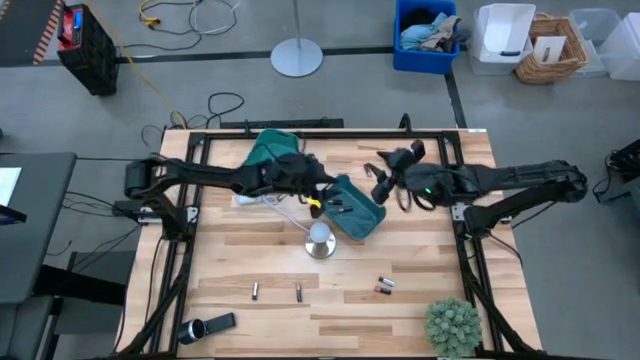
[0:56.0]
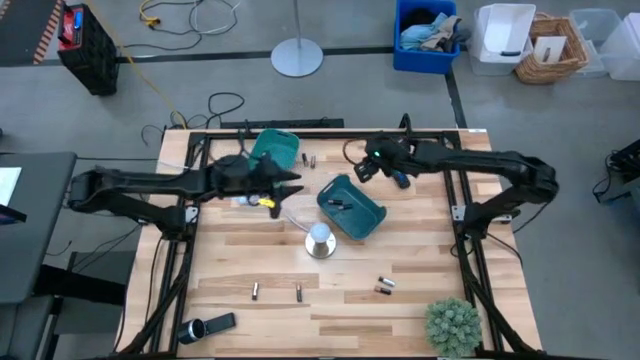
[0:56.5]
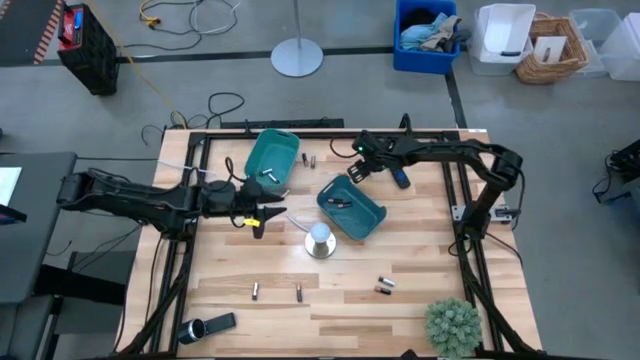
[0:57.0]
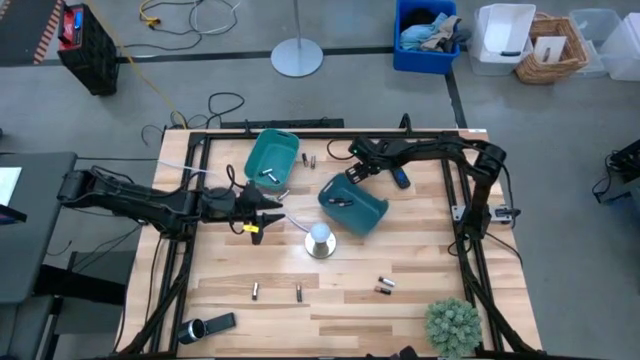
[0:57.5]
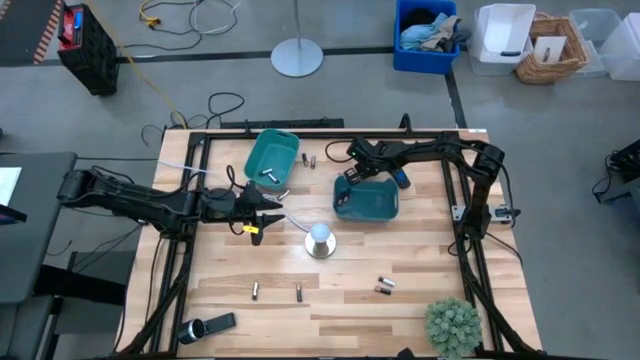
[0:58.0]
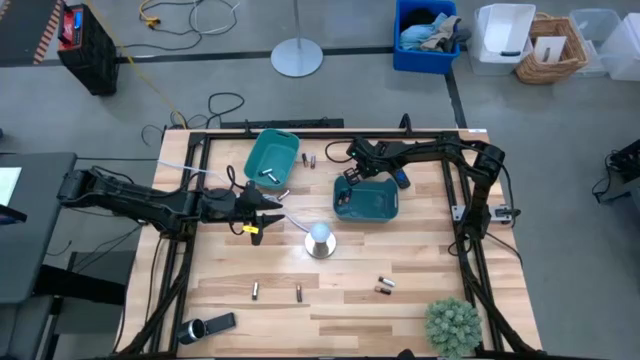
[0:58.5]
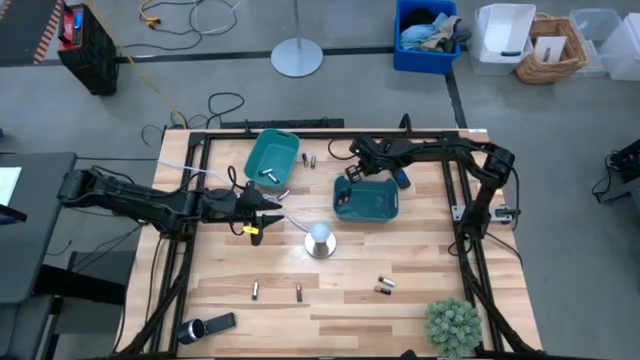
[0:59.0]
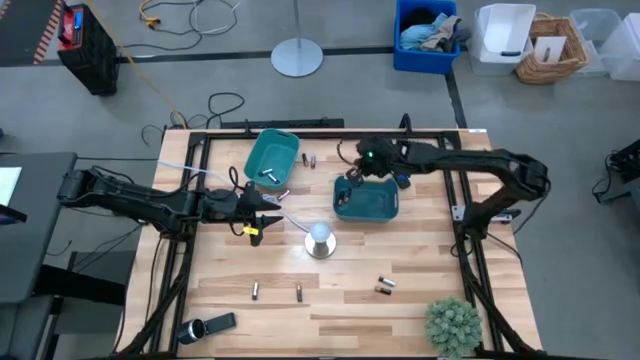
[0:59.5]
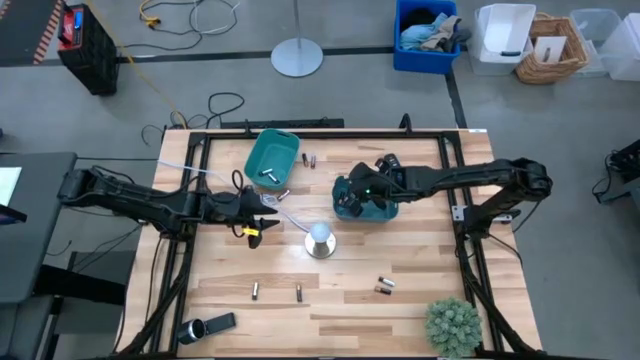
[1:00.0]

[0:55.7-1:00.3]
Task: Sort batteries
Put the black battery into the blue bin

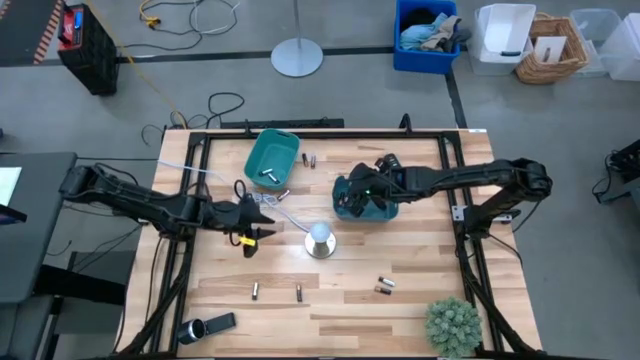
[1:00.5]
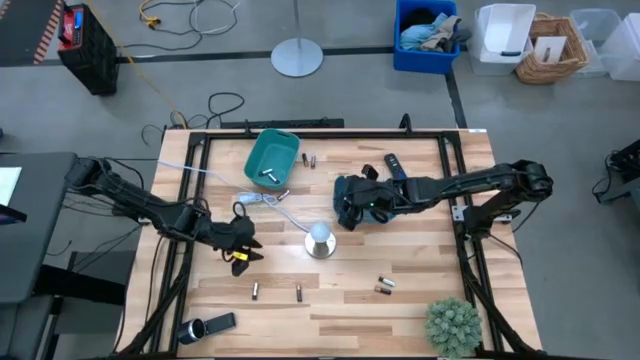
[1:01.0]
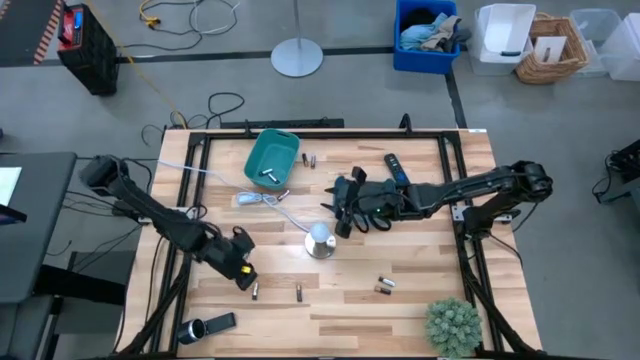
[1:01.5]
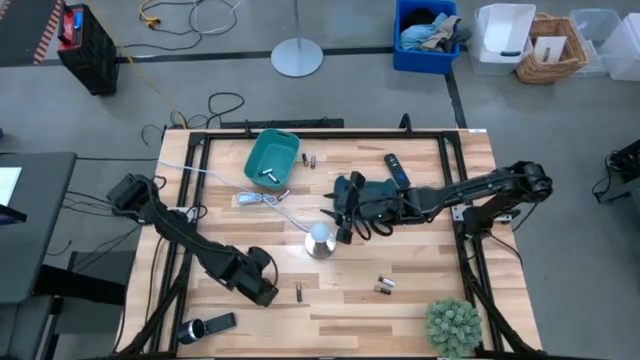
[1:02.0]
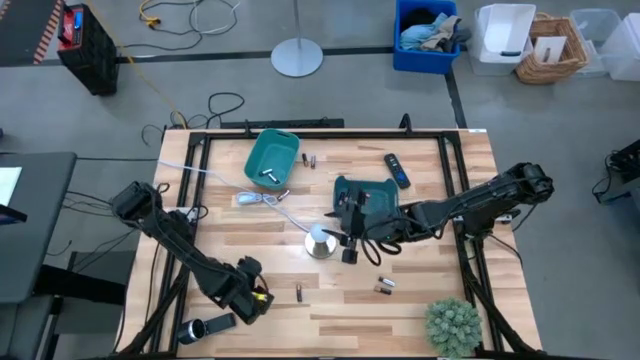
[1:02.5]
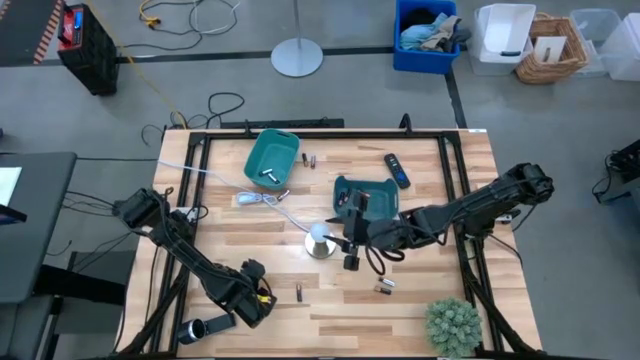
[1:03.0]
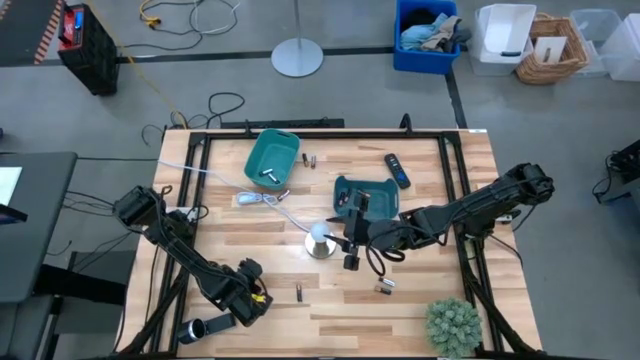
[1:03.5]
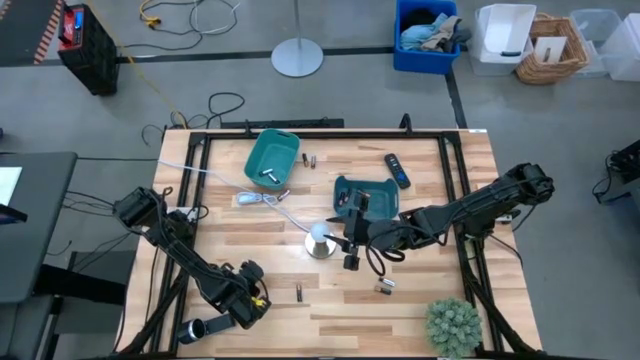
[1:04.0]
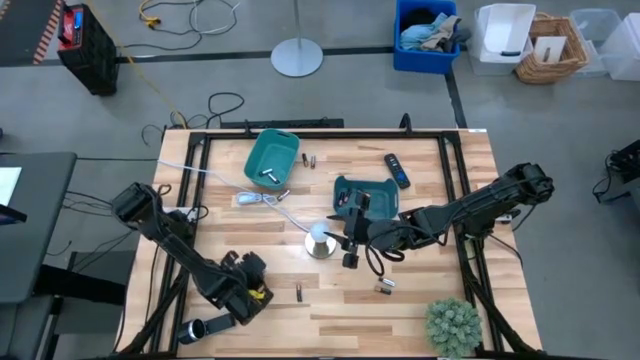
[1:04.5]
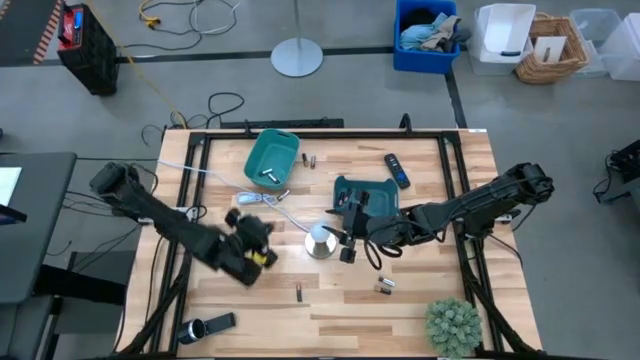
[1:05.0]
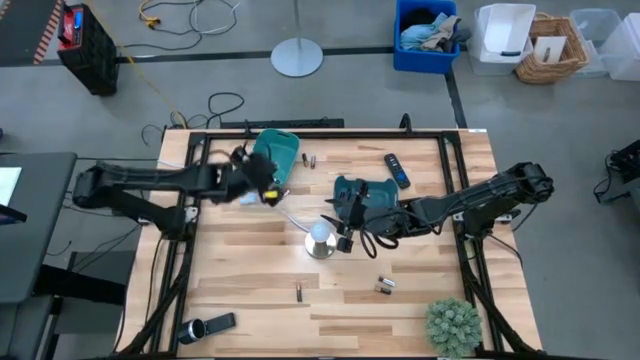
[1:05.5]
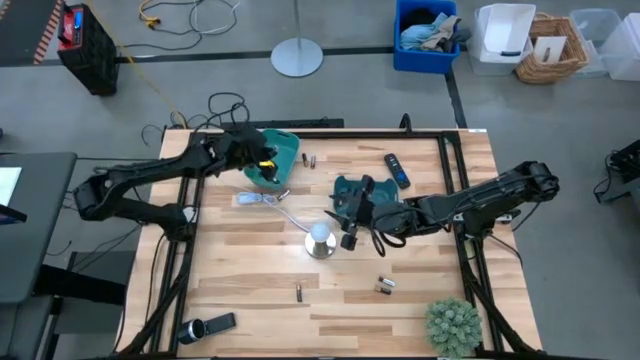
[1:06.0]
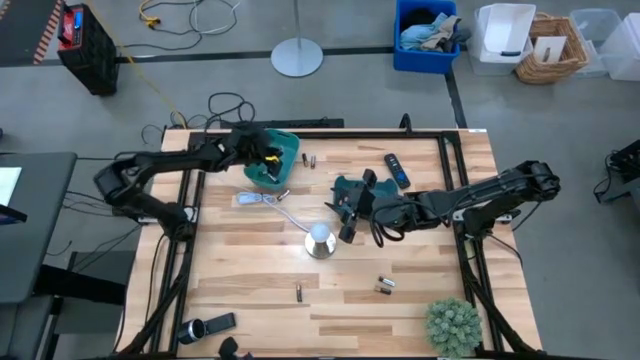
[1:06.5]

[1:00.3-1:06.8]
Put the silver battery into the green bin

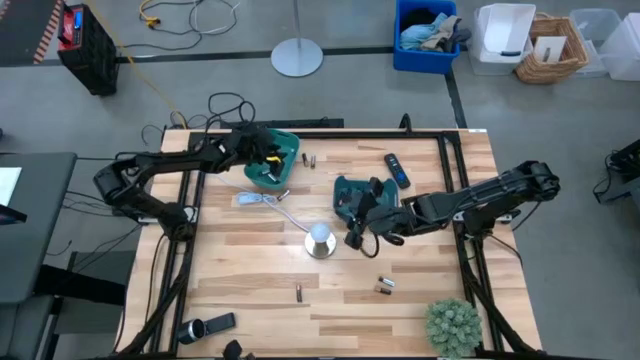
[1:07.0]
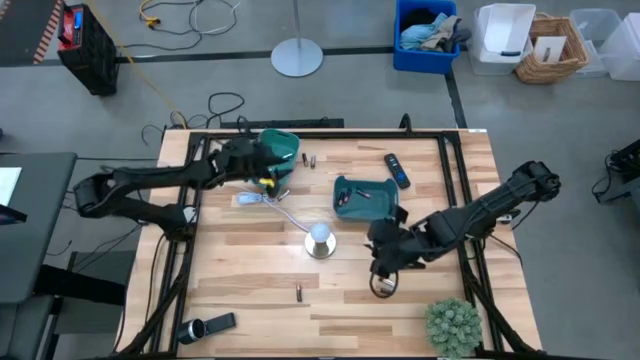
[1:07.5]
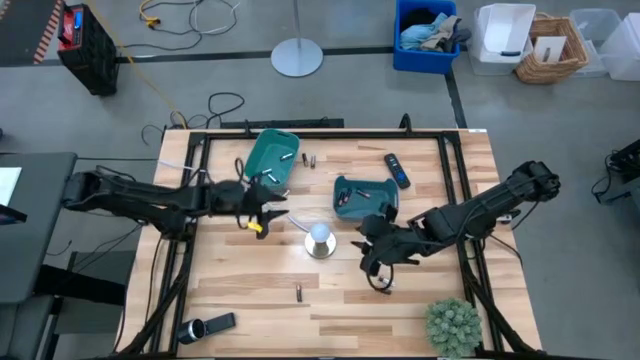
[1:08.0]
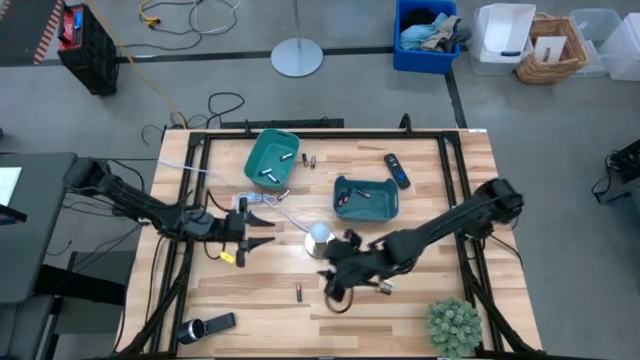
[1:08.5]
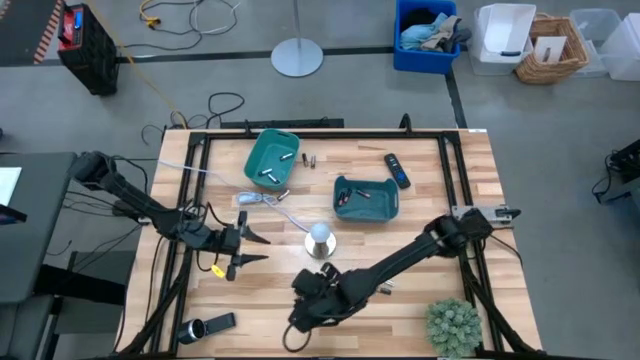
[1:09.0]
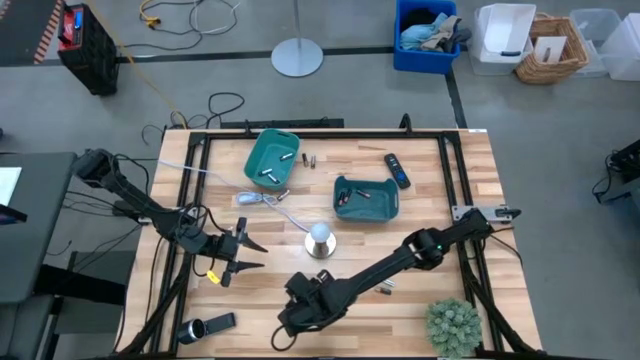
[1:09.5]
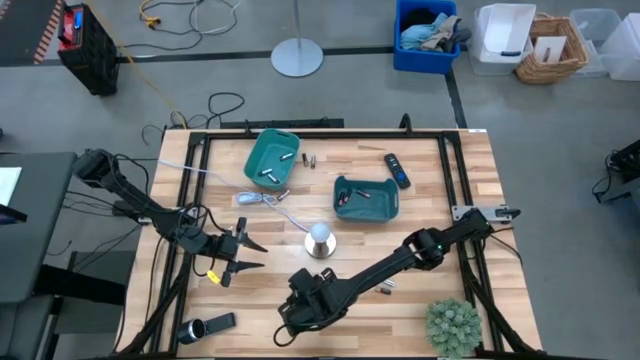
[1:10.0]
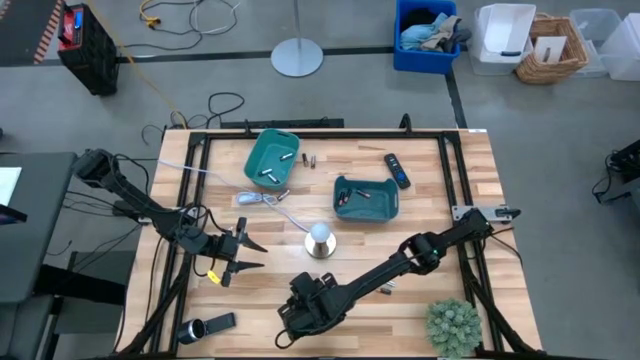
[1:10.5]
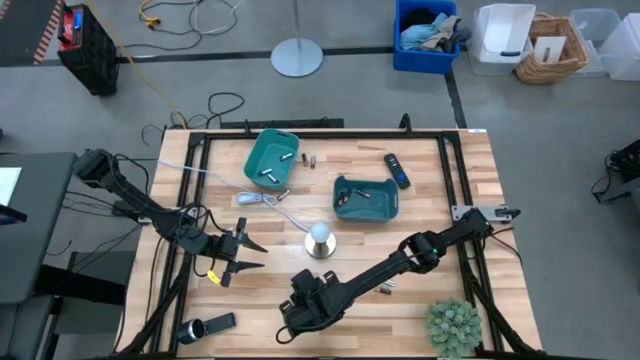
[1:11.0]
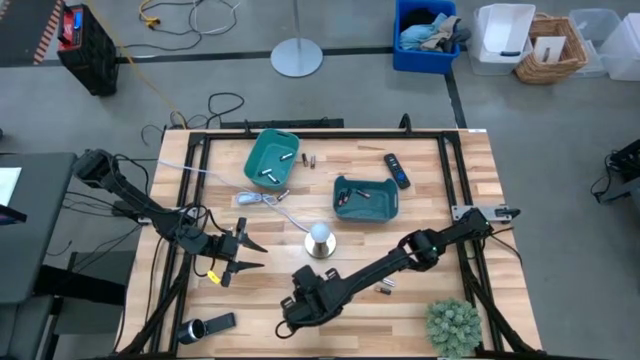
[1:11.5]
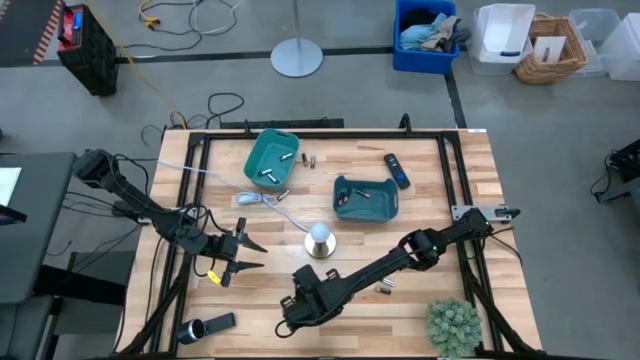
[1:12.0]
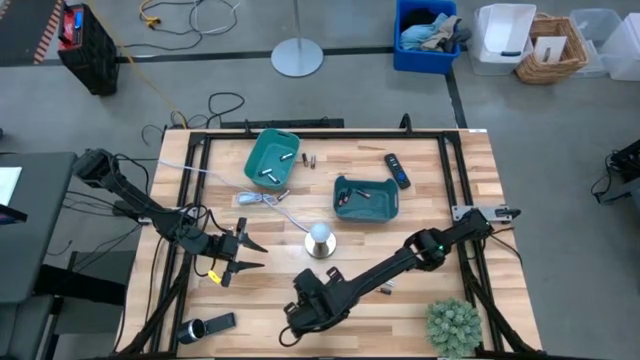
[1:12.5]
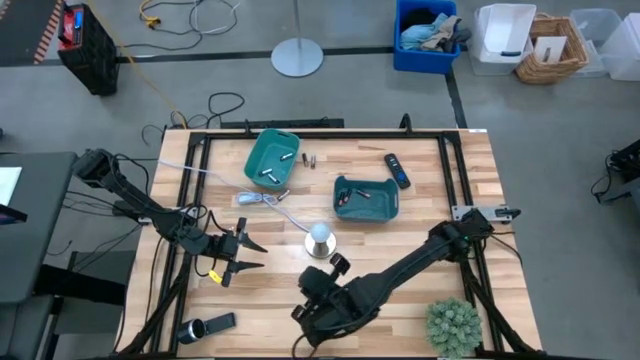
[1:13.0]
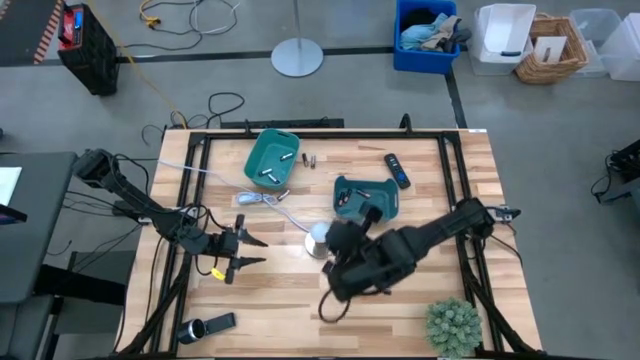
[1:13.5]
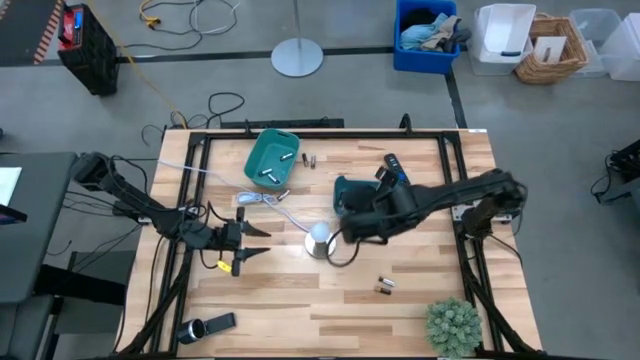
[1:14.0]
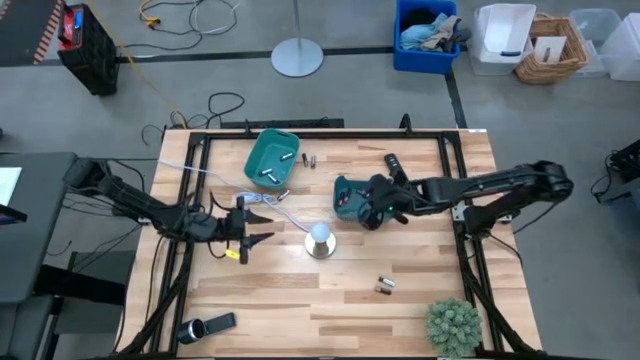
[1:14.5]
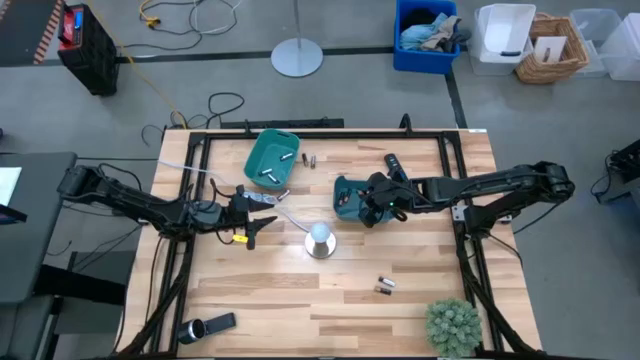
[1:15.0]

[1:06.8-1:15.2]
Put the black battery into the blue bin
